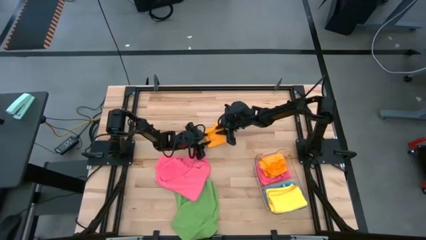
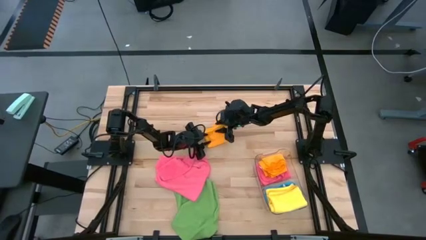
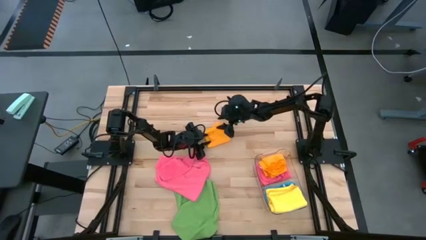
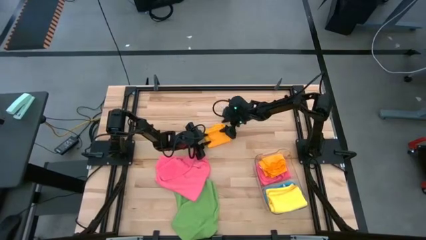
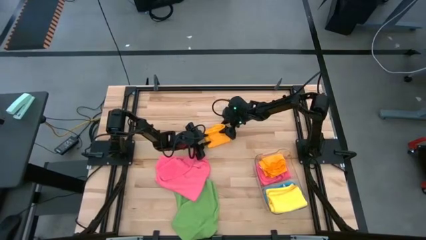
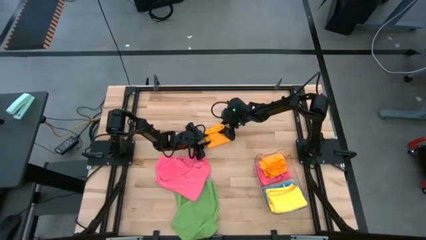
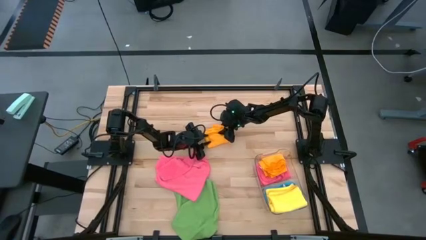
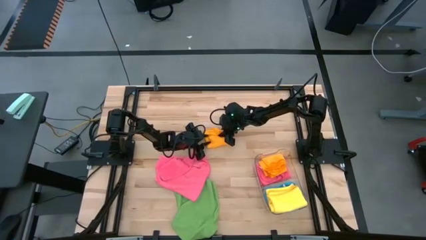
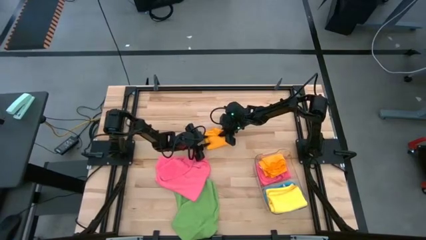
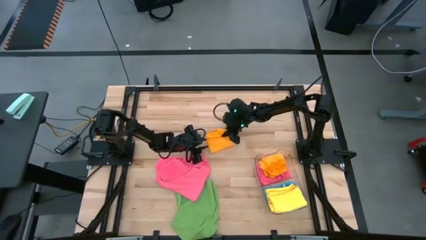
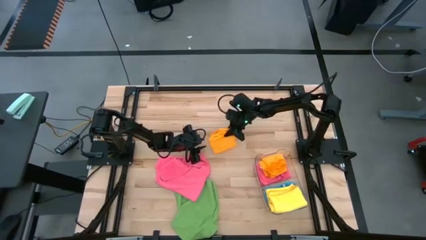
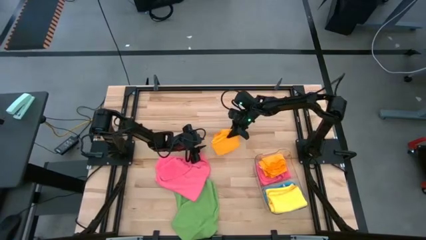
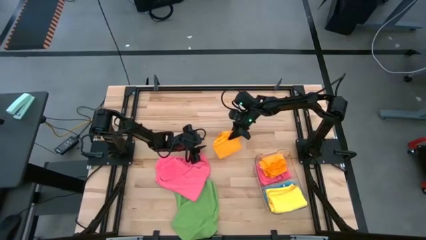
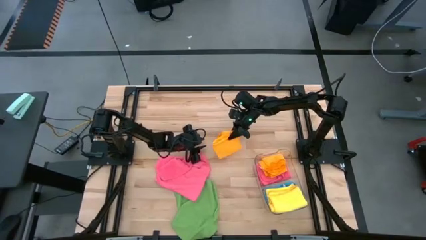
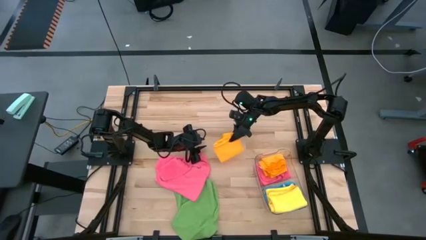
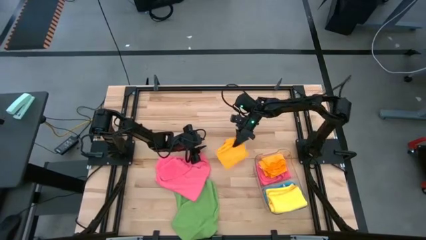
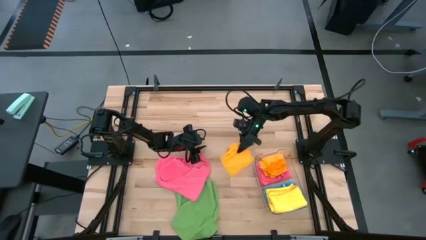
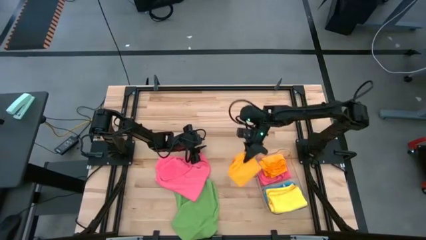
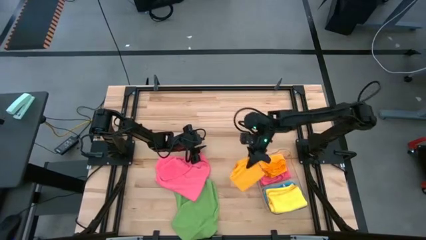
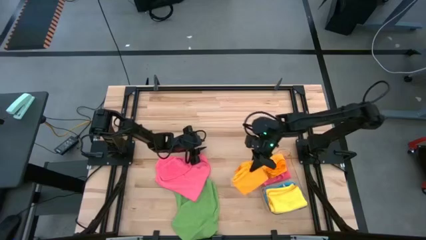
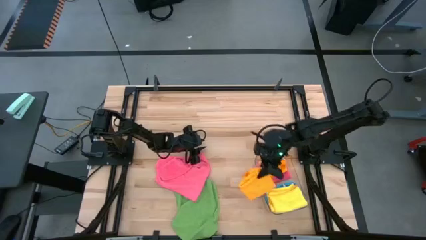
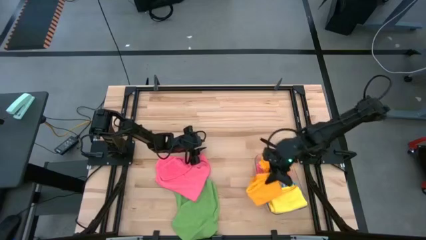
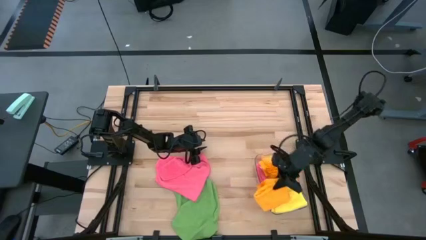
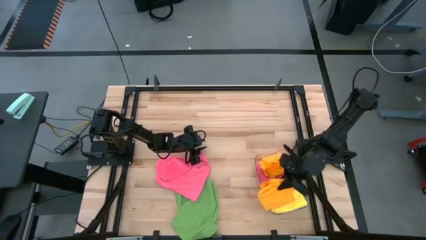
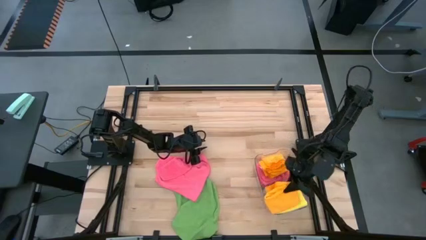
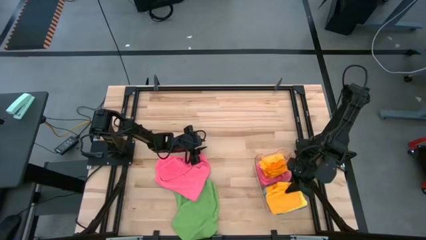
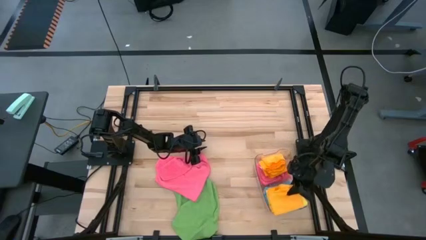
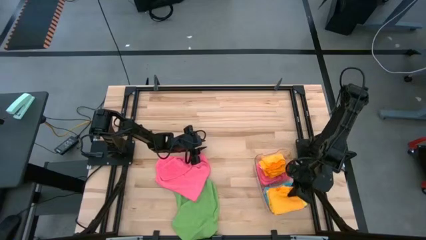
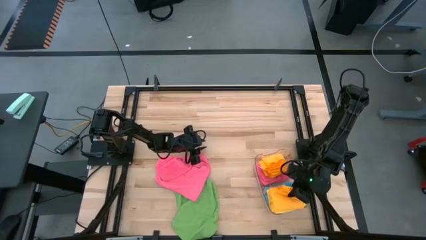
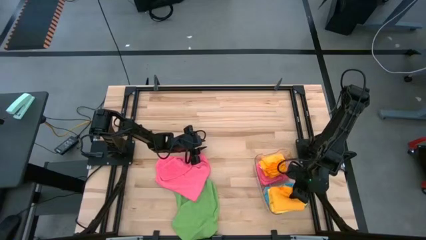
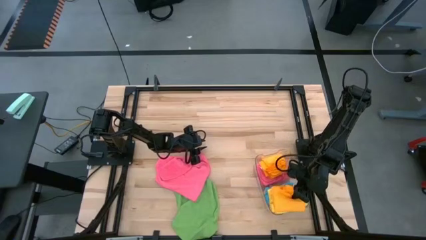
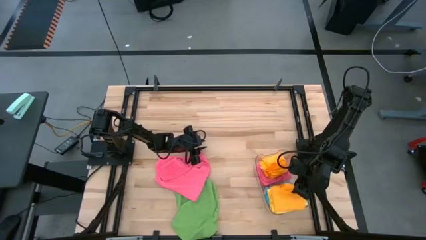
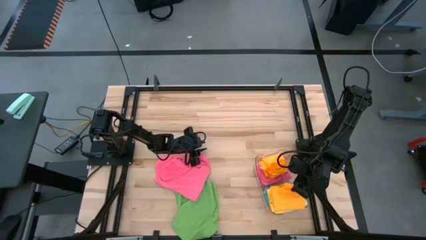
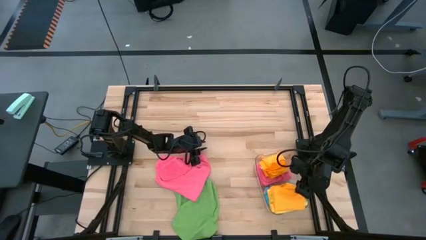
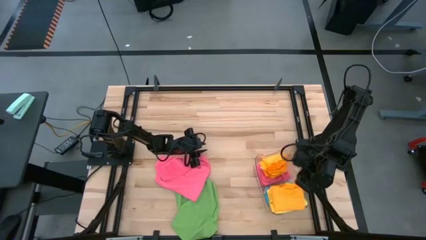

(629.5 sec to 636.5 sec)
Task: Fold microfiber towels
Put the folded orange towel into the transparent bin

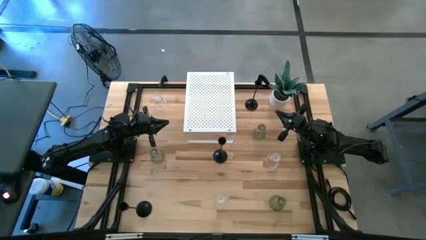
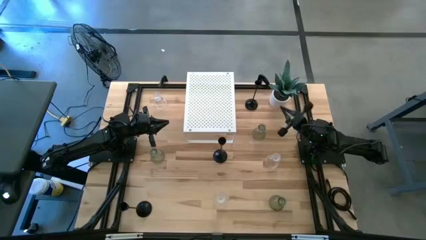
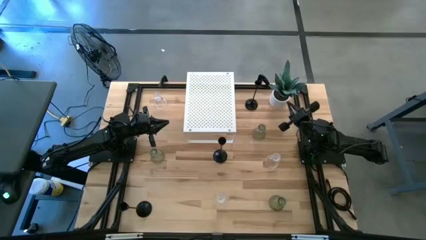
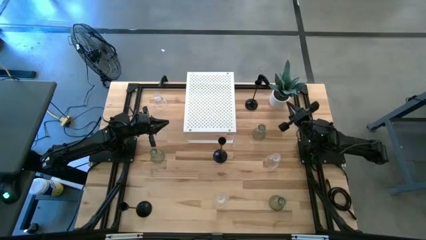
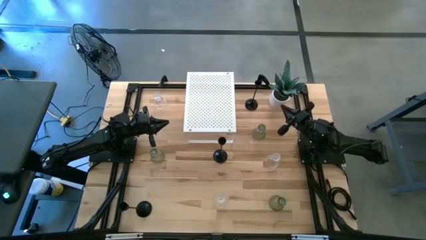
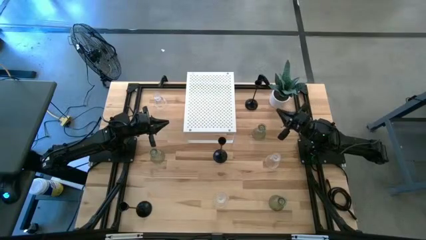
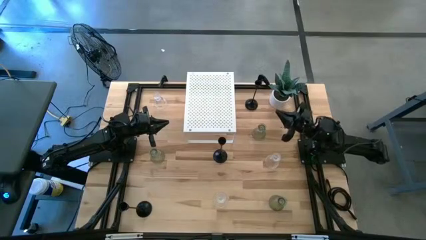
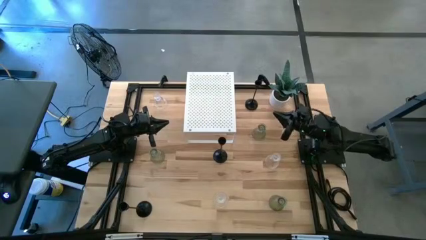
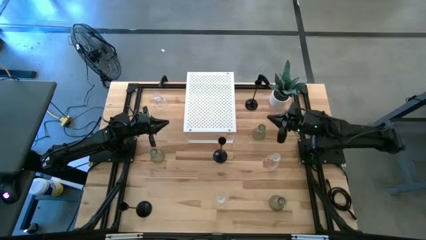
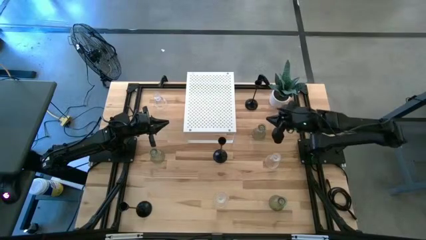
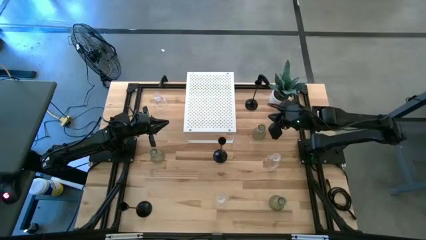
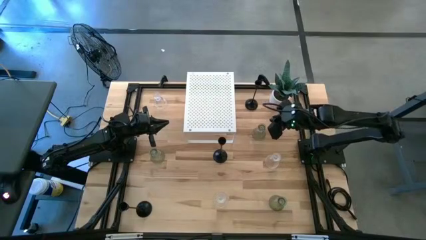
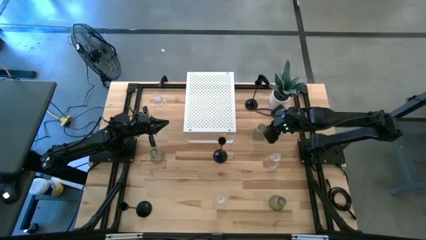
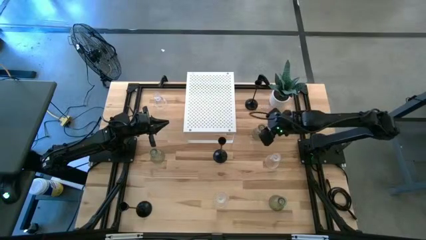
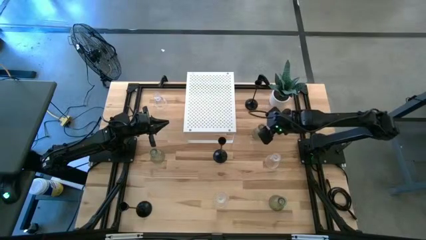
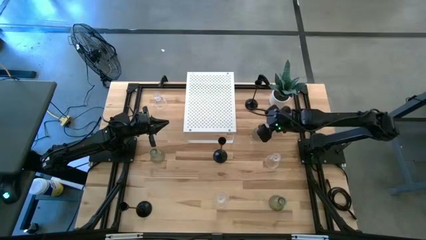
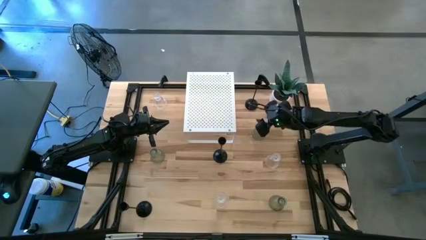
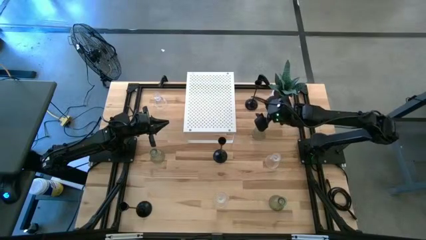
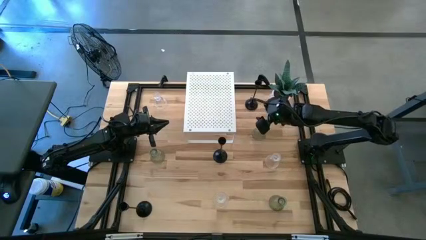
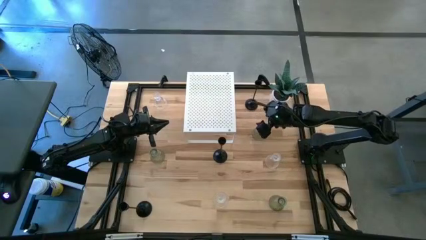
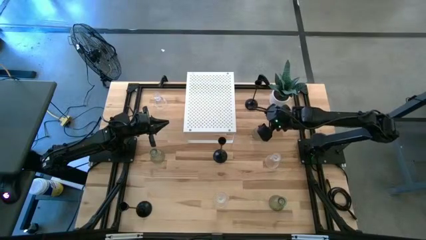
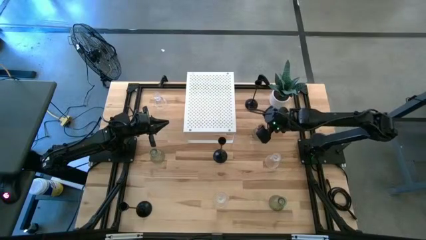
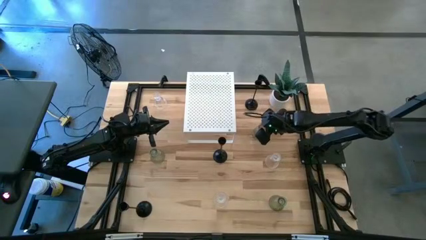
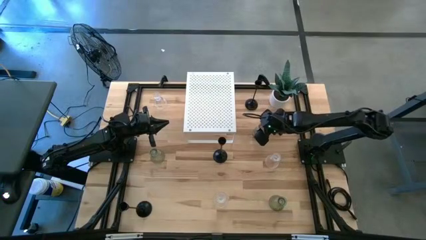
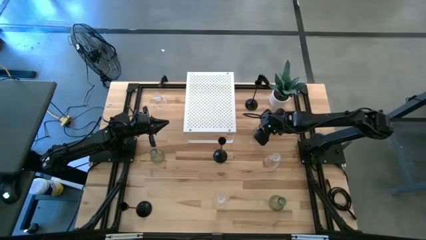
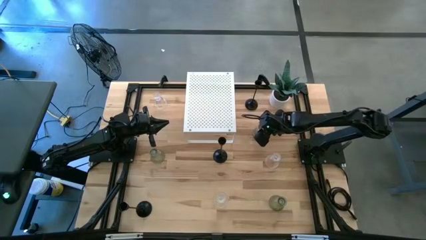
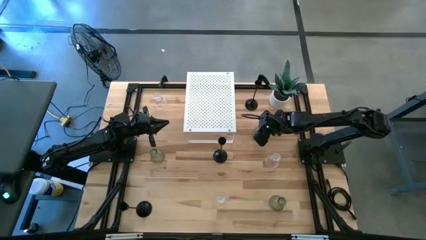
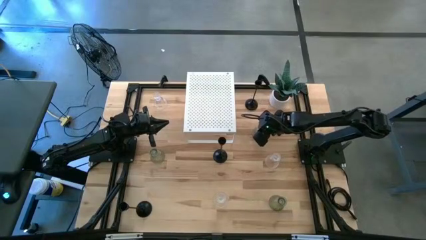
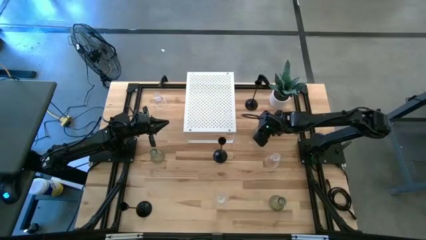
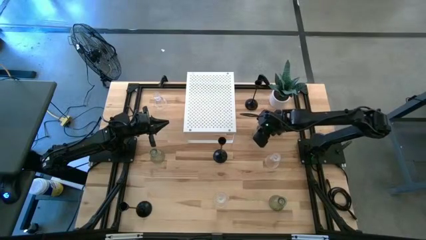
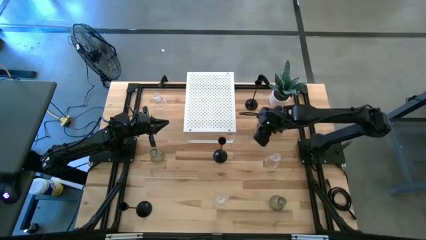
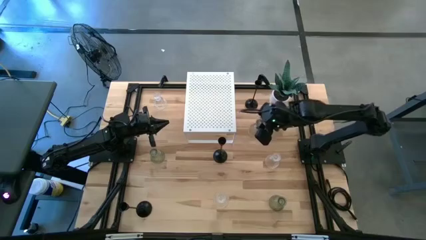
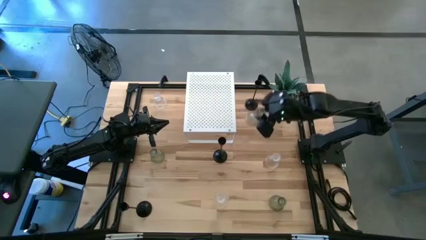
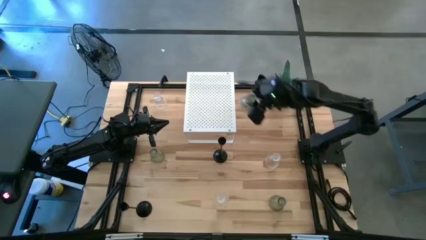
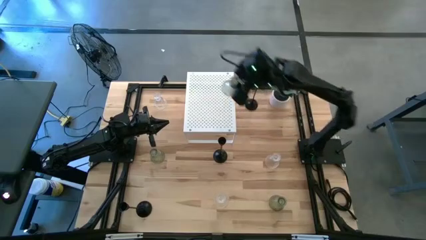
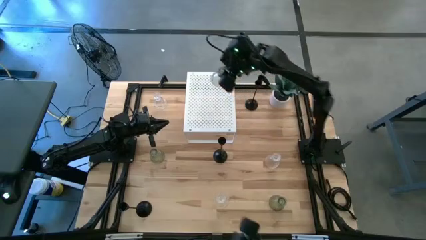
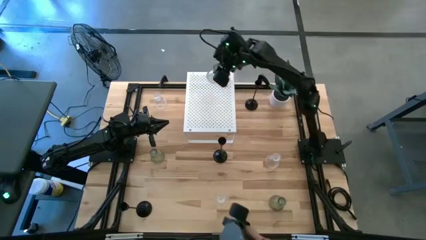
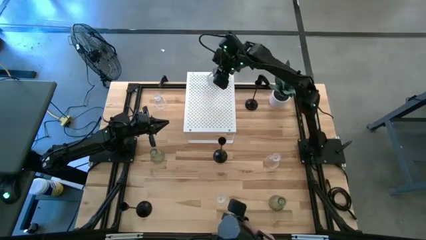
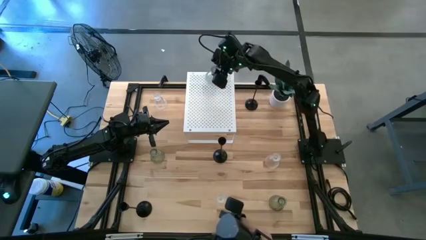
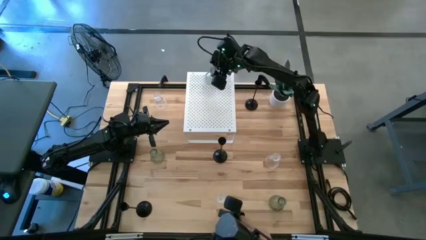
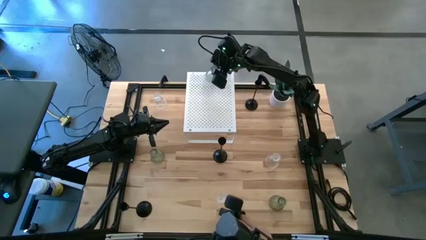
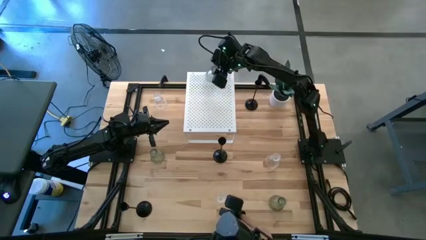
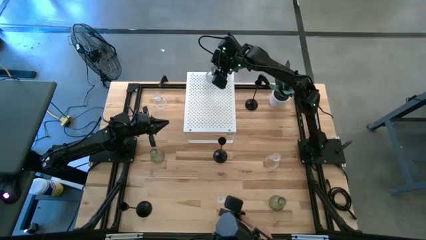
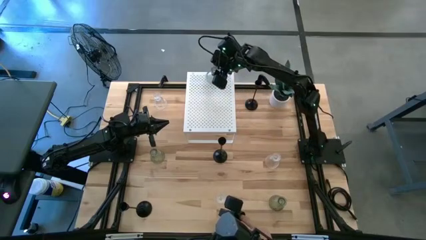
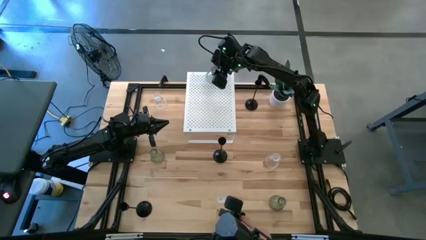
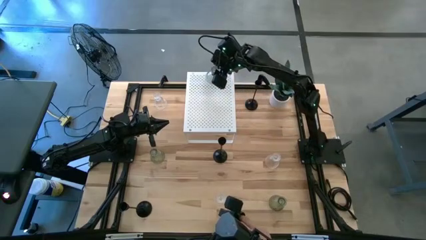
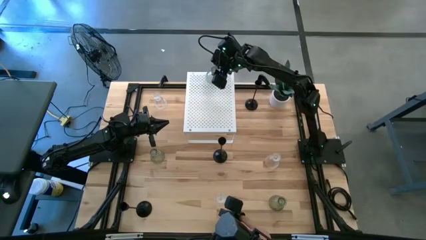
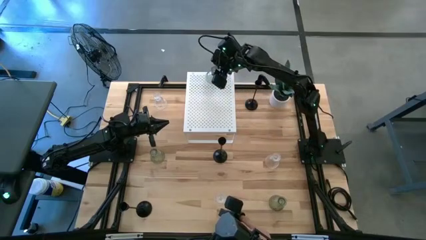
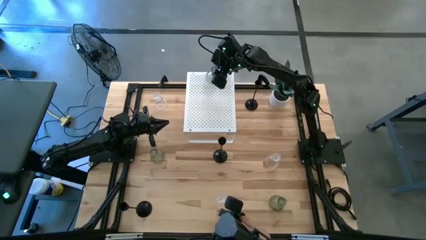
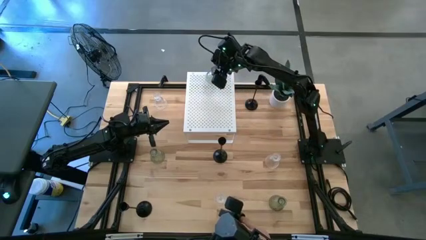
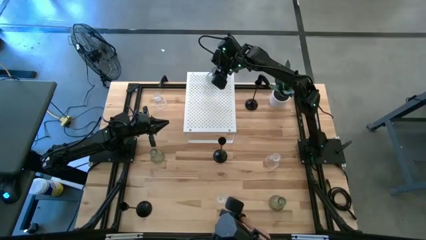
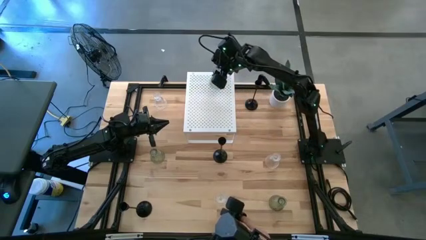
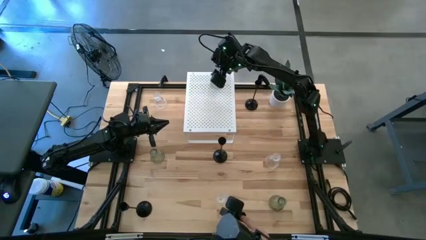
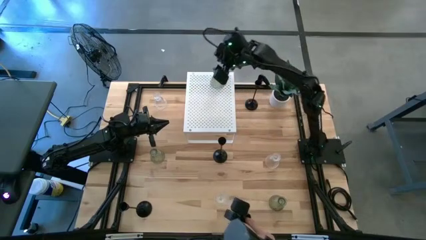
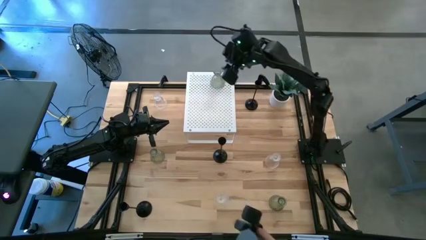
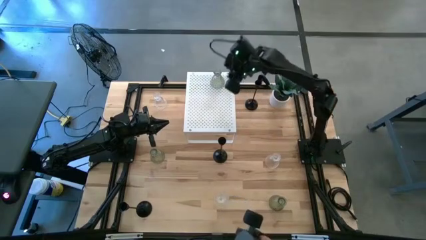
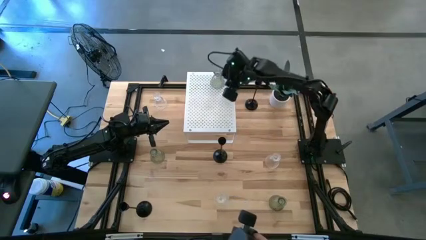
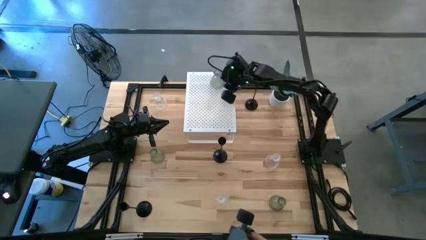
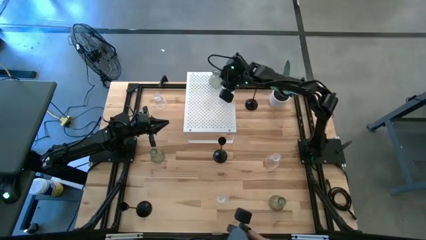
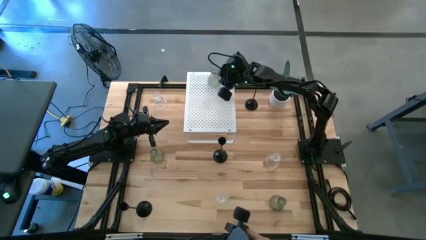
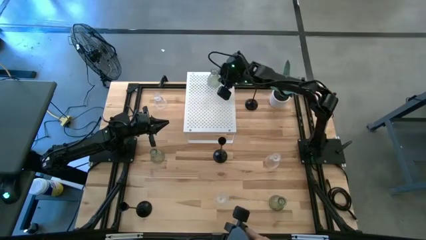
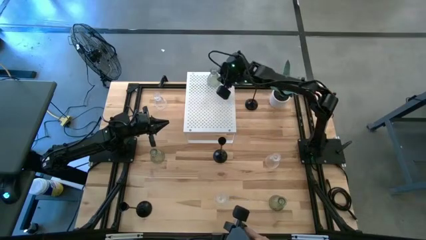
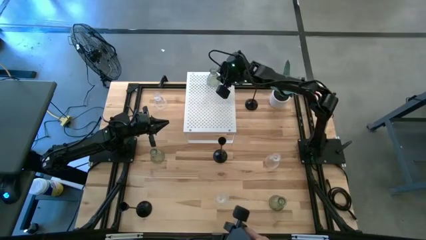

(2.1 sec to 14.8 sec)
Task: Pick & Place candle stick holders
Put the top right green glass candle holder on the shelf
